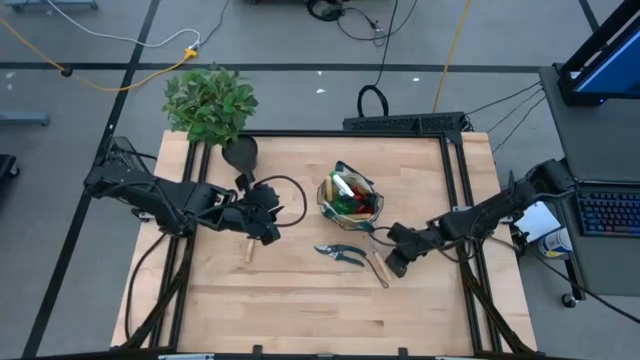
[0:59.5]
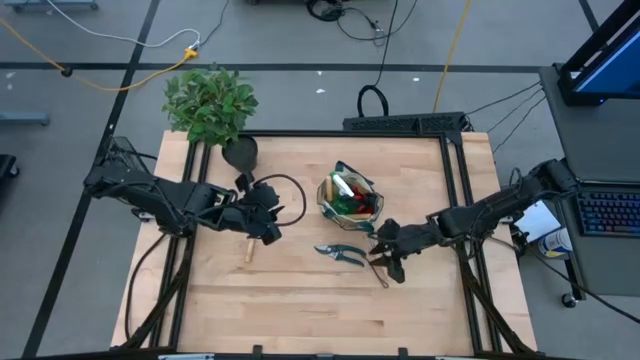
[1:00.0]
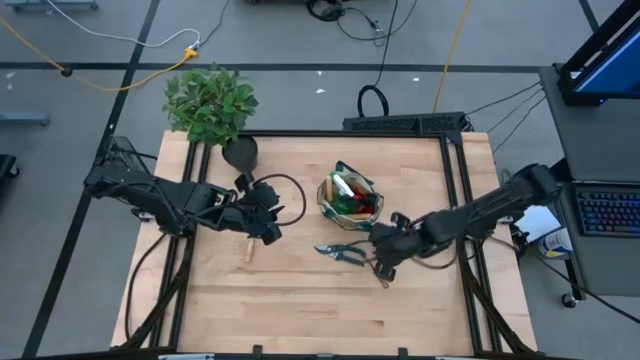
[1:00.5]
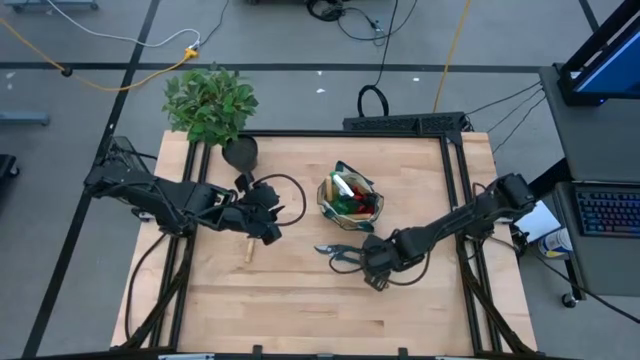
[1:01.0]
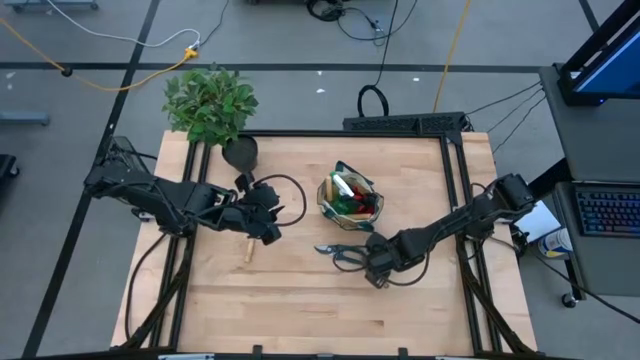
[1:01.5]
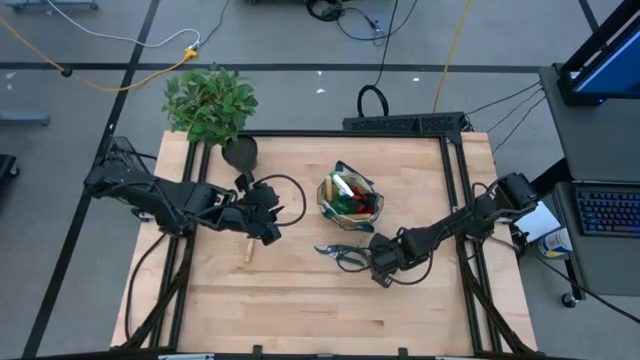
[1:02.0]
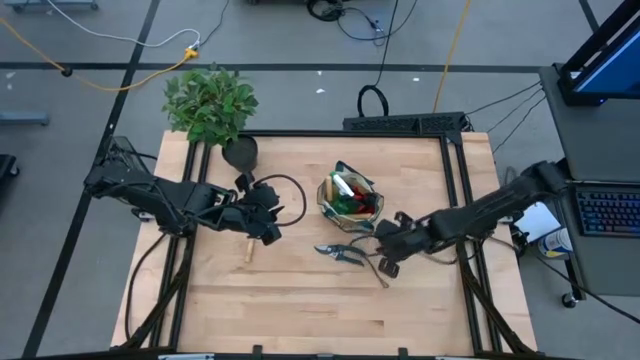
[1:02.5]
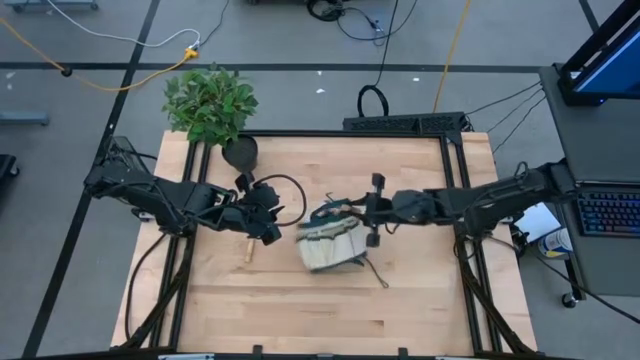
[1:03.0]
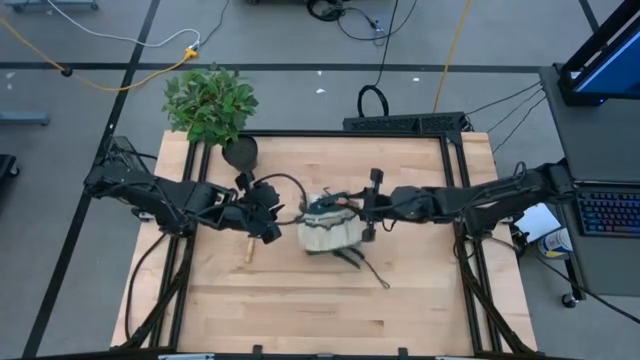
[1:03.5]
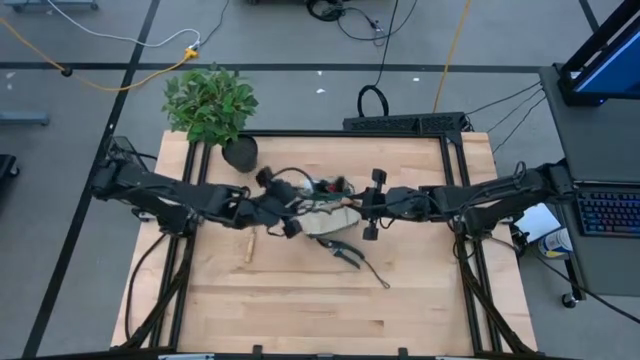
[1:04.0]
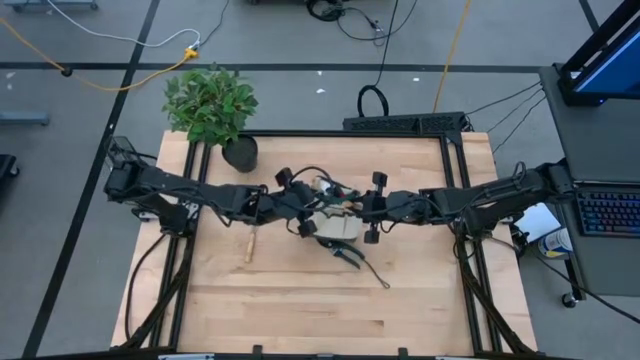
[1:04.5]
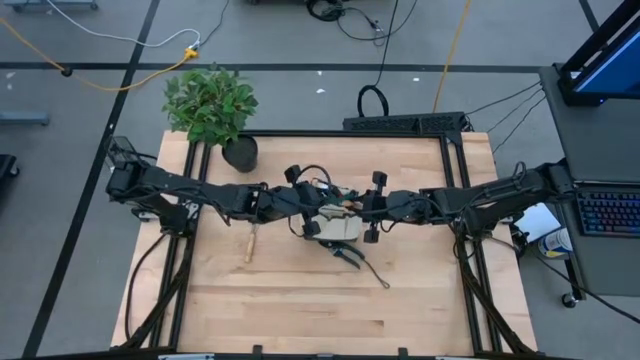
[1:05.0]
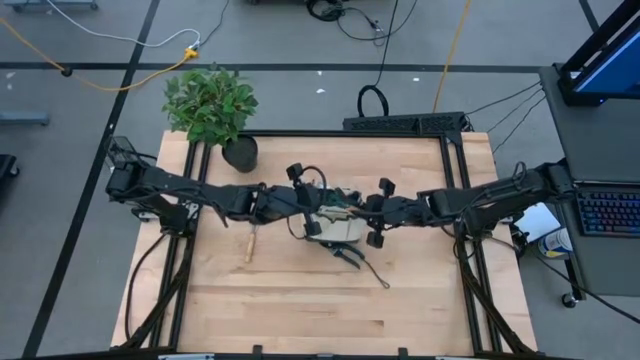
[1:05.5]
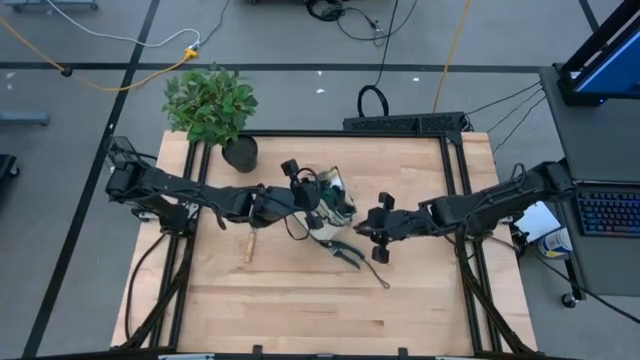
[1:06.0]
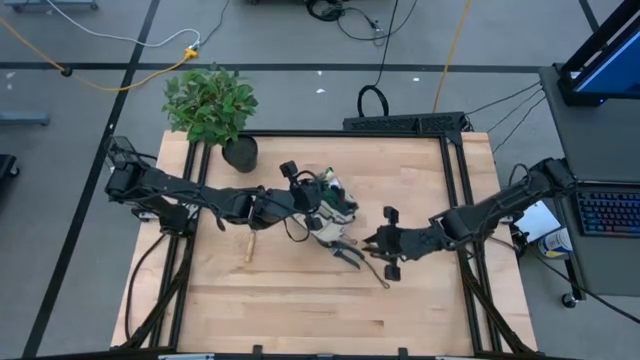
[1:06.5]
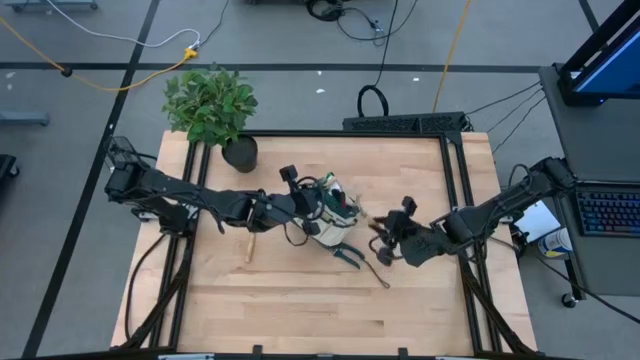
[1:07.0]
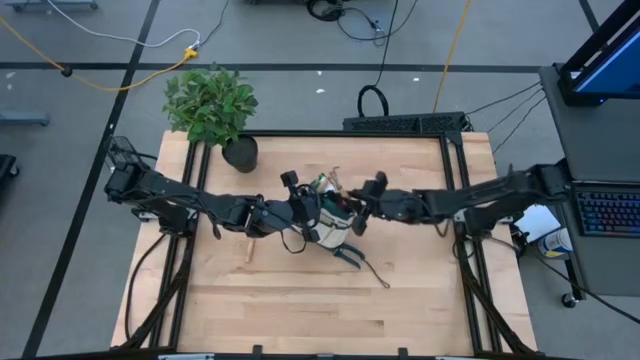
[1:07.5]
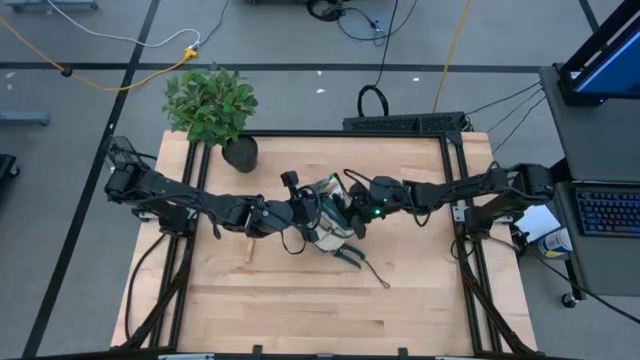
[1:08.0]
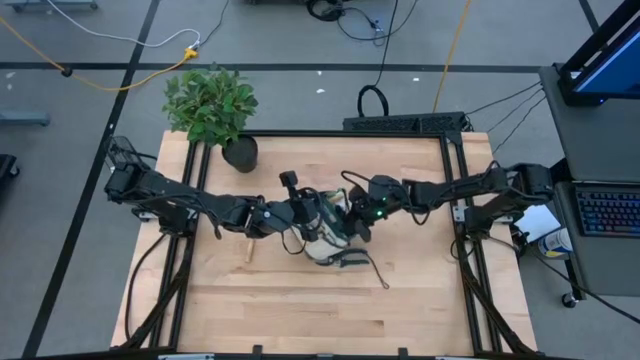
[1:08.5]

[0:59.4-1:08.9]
Task: Pick & Place Garden tools in Gardening bag
Put the right hand rake into the gardening bag

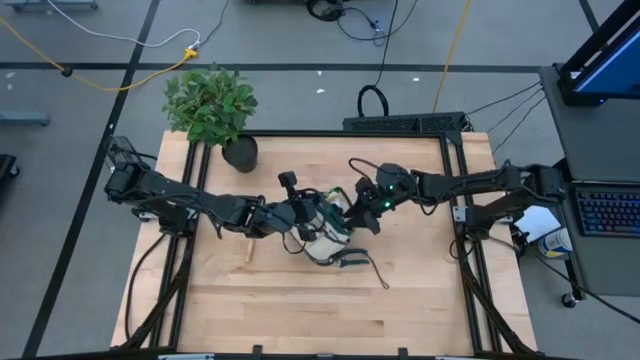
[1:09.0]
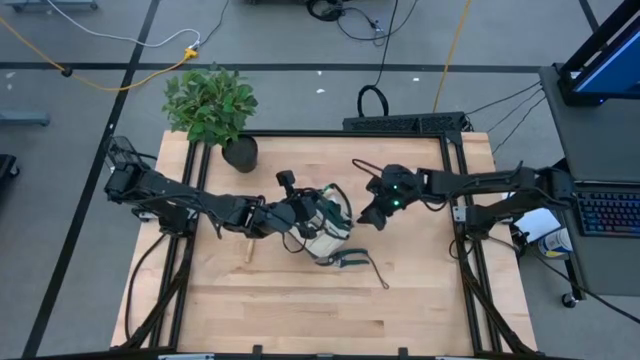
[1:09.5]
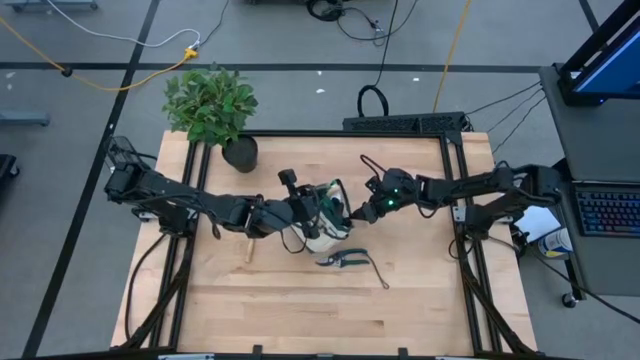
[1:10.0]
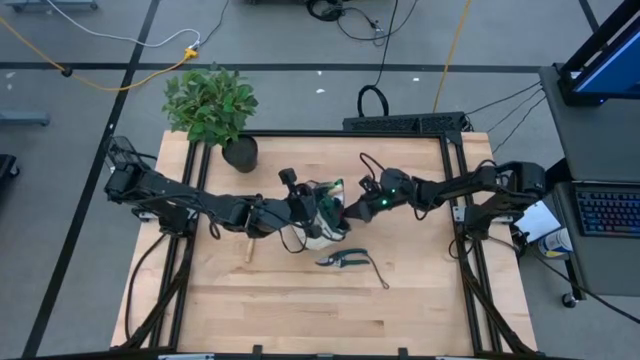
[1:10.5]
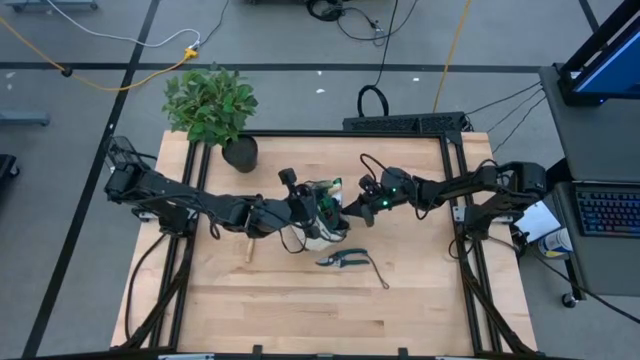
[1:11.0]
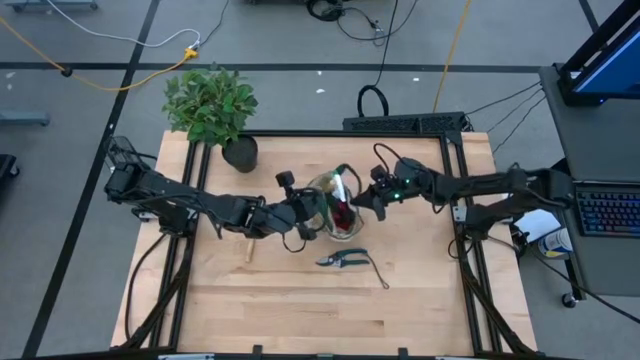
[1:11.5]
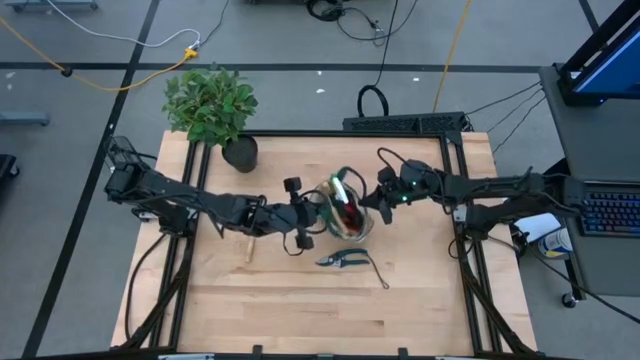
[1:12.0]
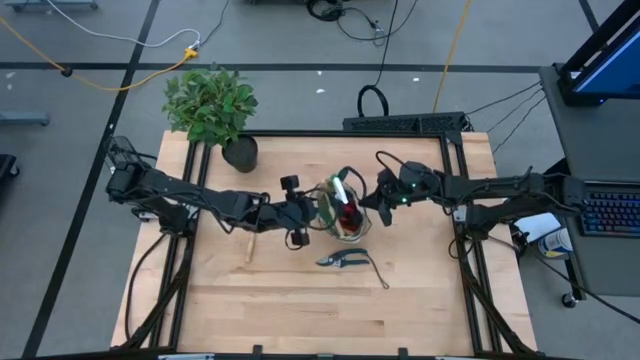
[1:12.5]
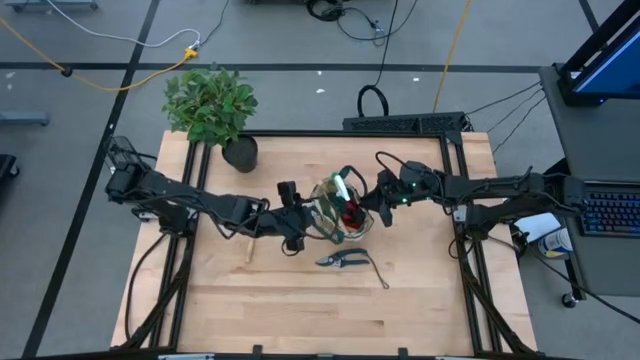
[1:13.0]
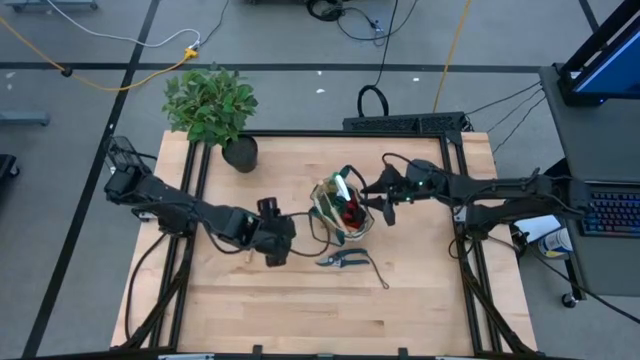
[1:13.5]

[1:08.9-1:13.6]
Adjust the gardening bag on the table

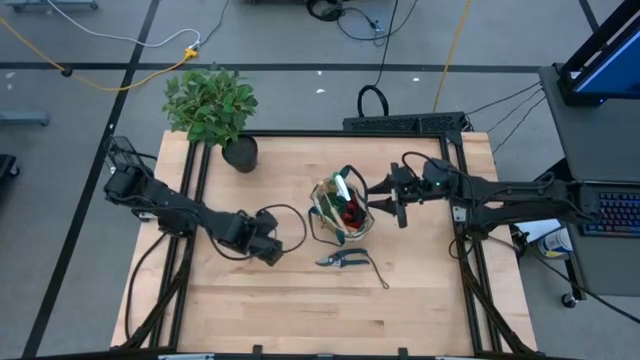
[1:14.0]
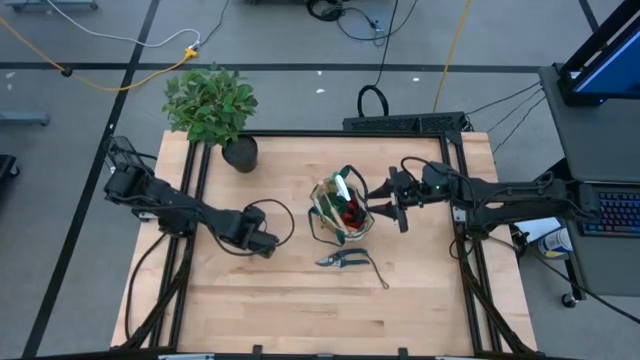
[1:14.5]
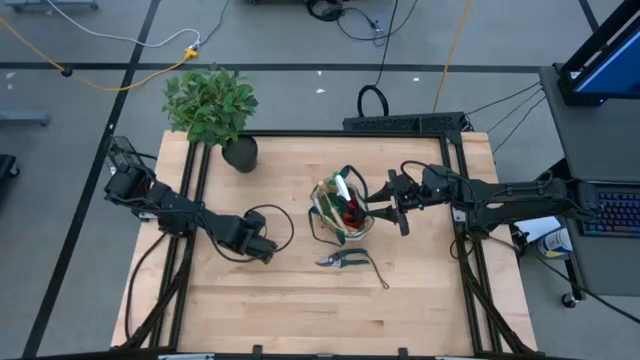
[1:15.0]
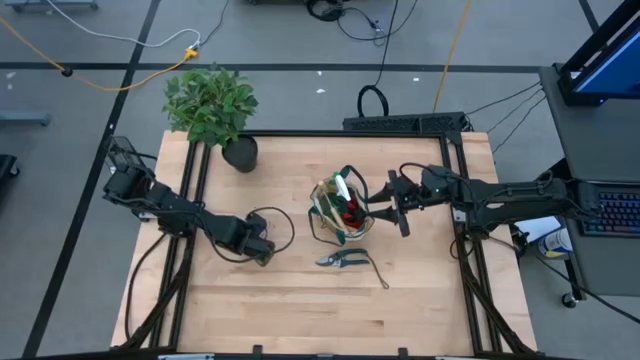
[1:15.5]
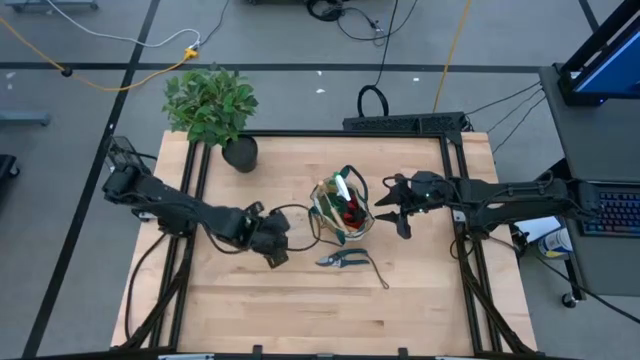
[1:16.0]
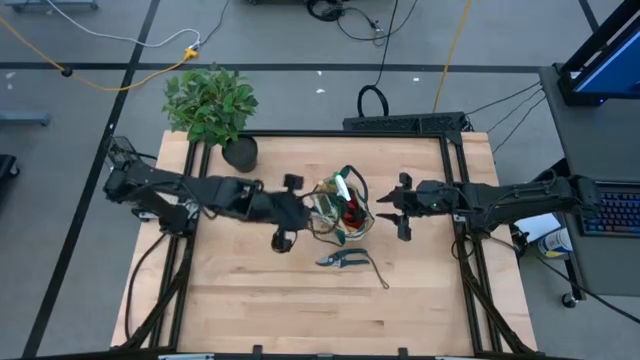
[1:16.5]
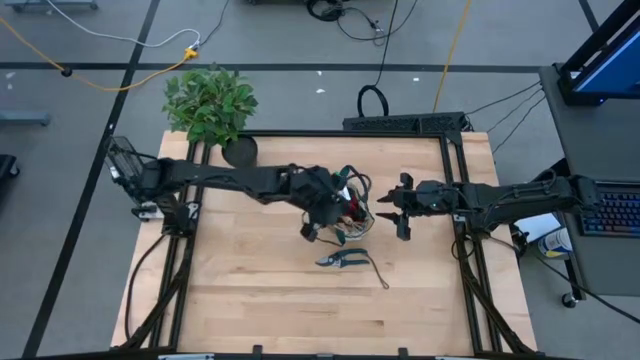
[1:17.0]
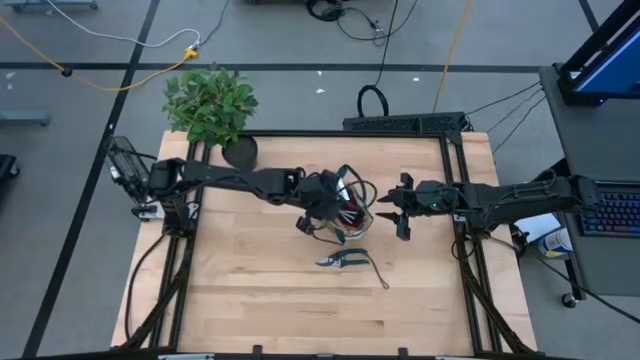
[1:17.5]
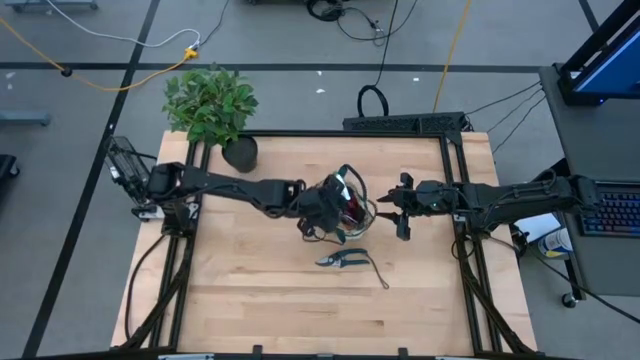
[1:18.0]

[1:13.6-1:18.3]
Put the hand rake into the gardening bag

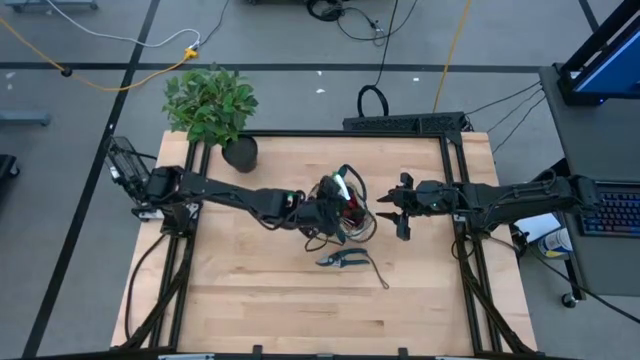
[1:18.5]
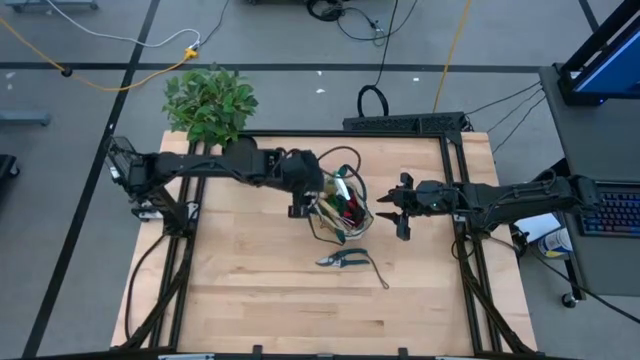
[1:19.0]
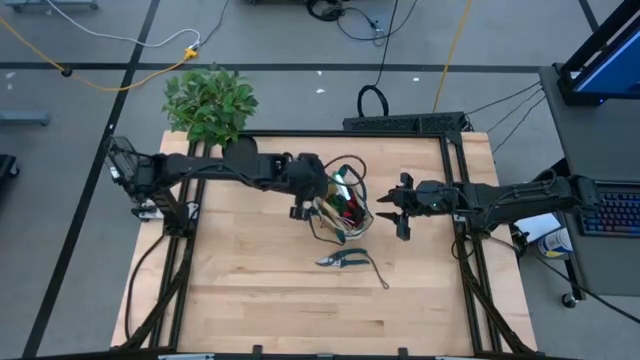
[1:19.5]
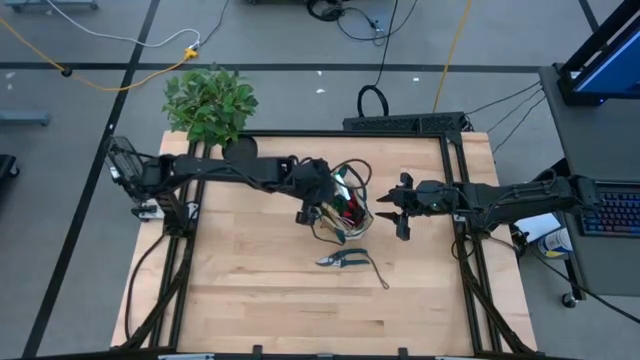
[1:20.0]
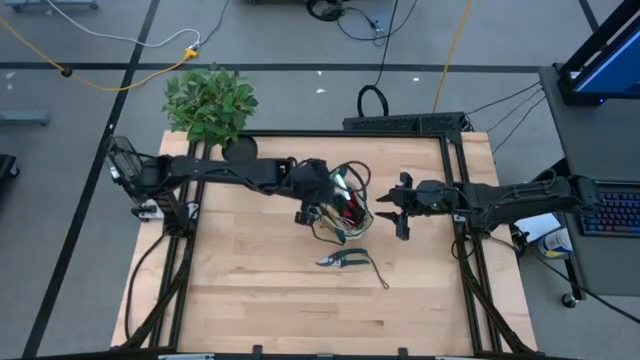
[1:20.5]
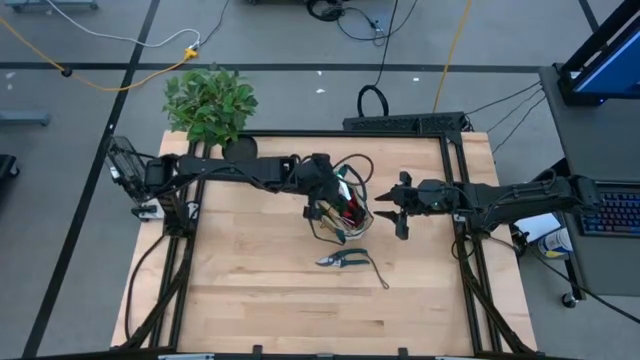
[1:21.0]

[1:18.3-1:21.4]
Adjust the top trowel in the gardening bag
